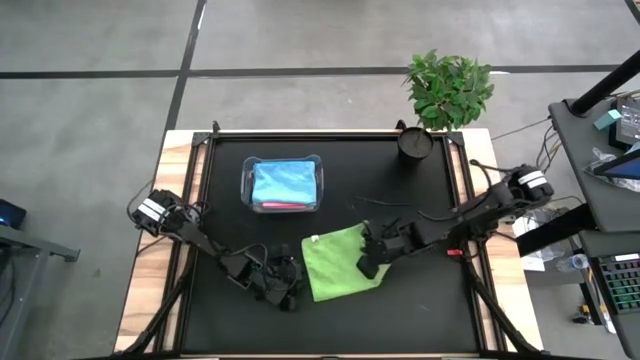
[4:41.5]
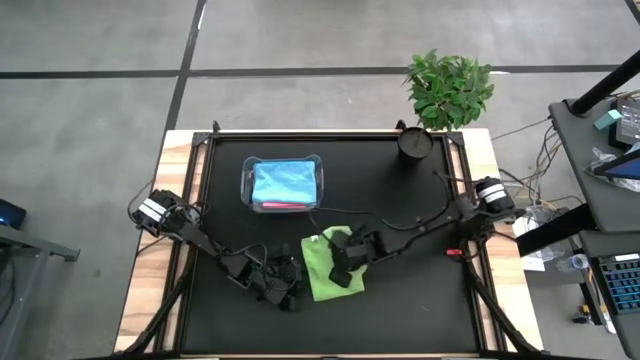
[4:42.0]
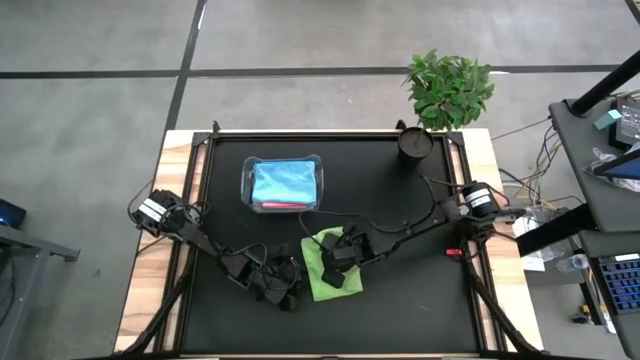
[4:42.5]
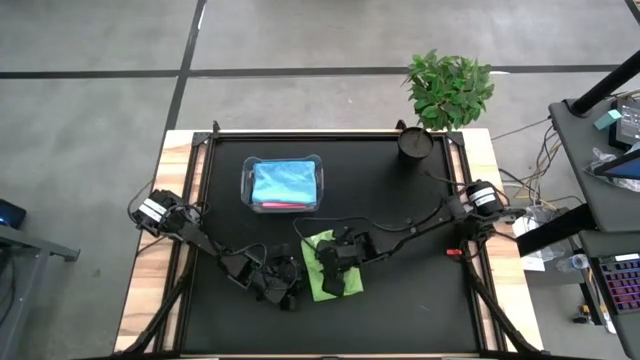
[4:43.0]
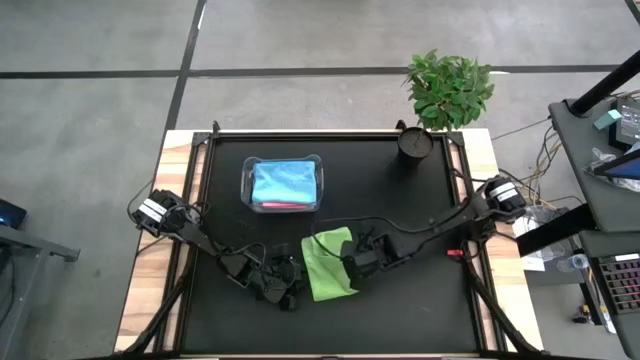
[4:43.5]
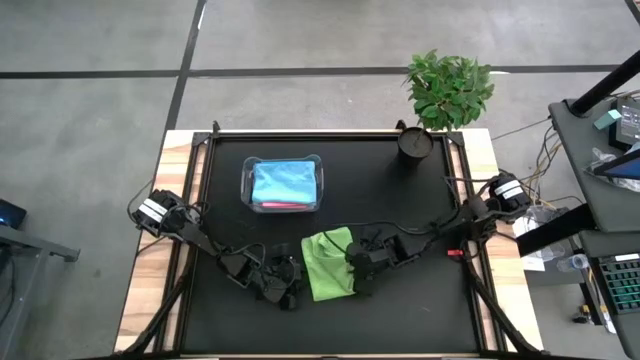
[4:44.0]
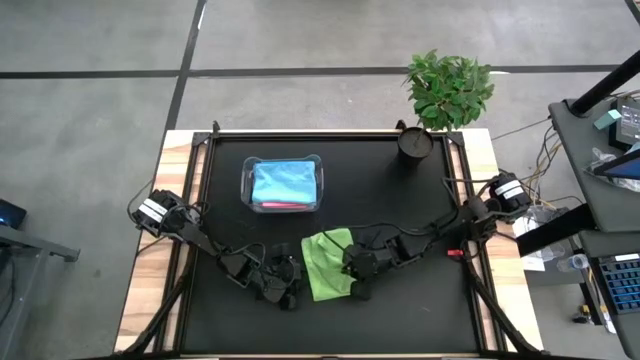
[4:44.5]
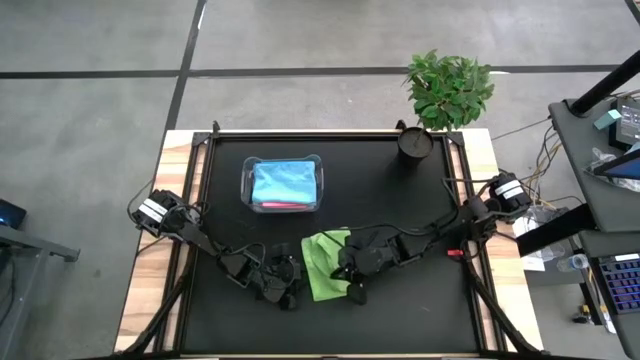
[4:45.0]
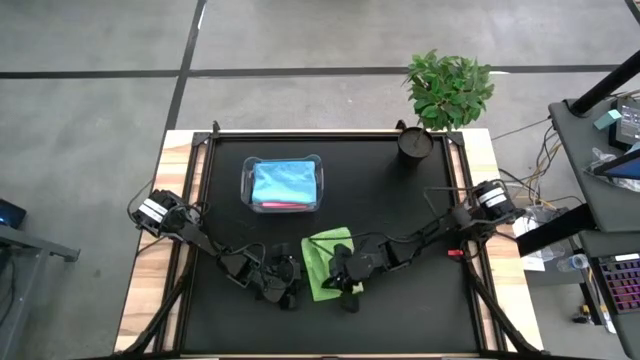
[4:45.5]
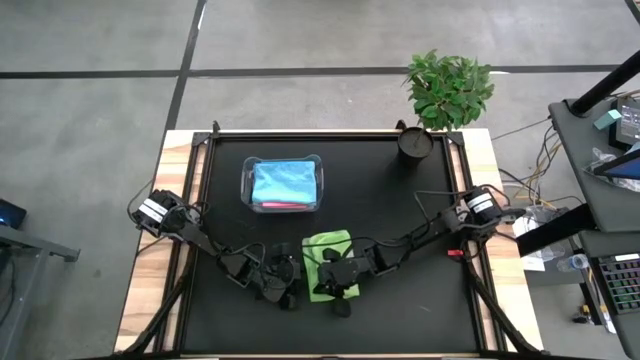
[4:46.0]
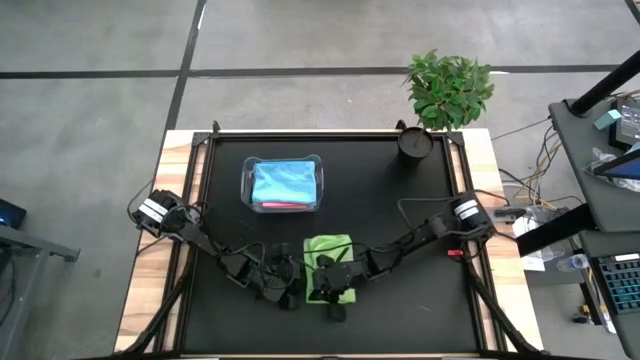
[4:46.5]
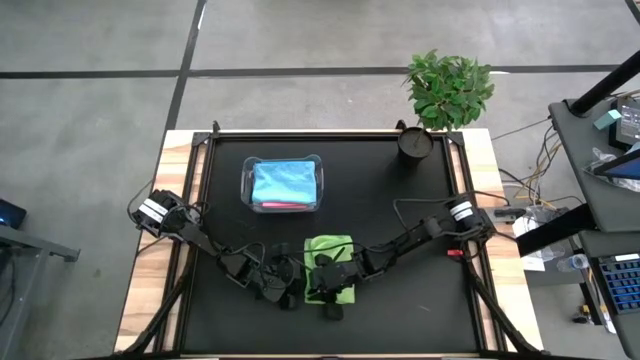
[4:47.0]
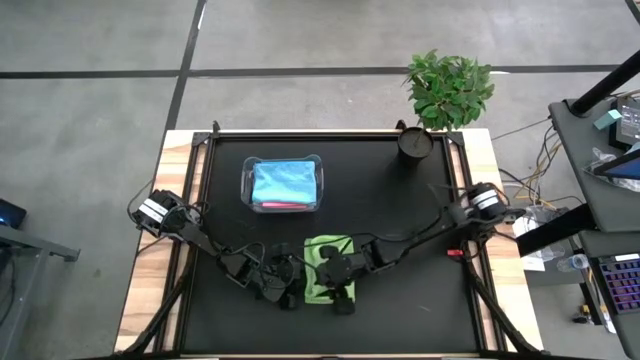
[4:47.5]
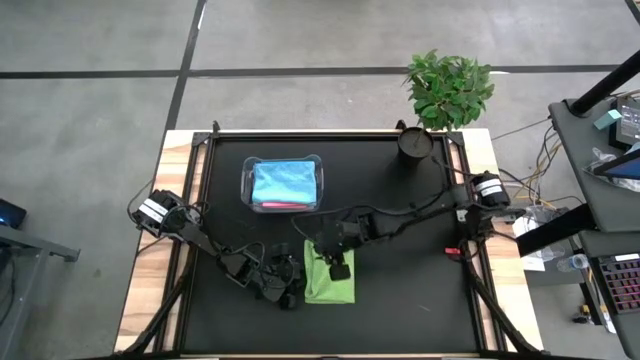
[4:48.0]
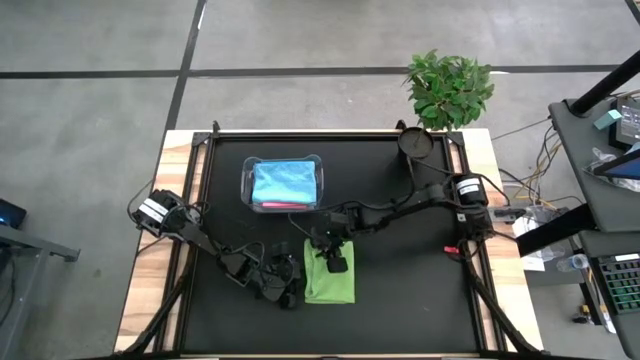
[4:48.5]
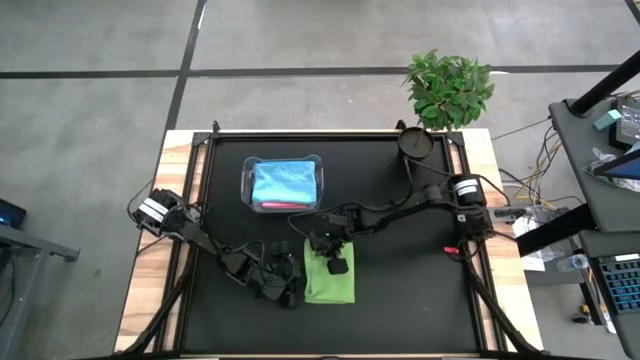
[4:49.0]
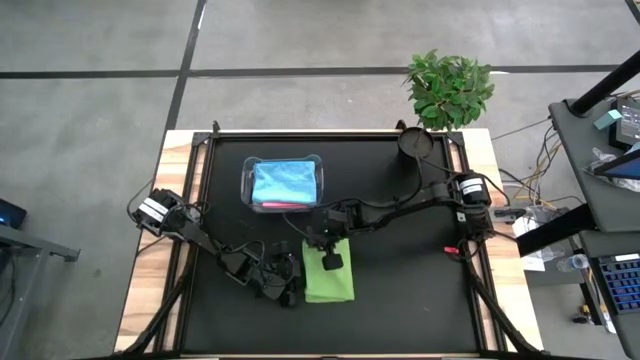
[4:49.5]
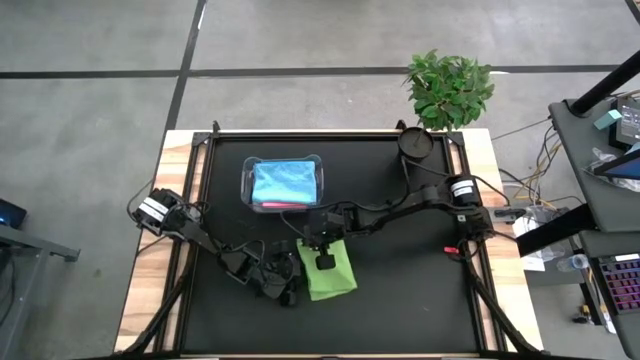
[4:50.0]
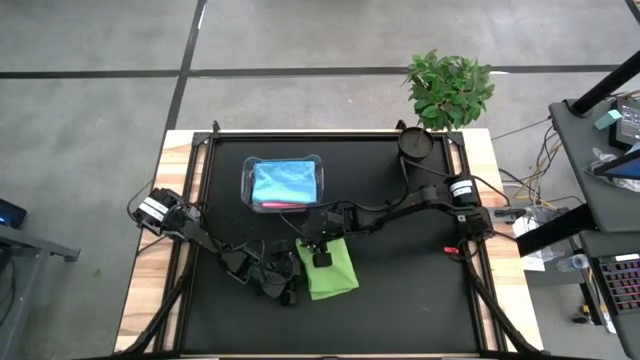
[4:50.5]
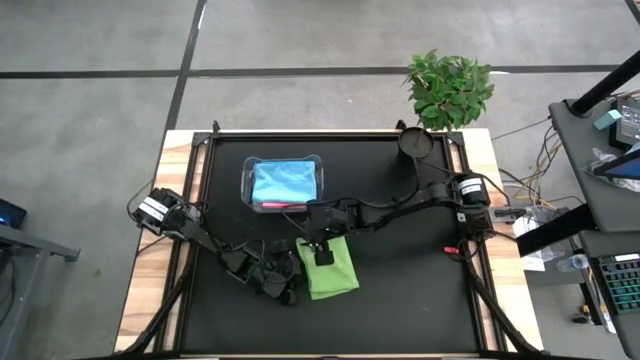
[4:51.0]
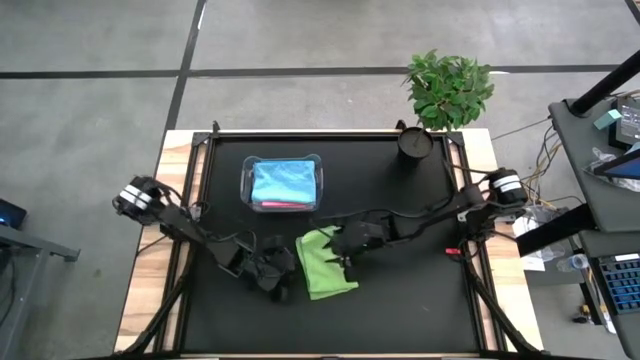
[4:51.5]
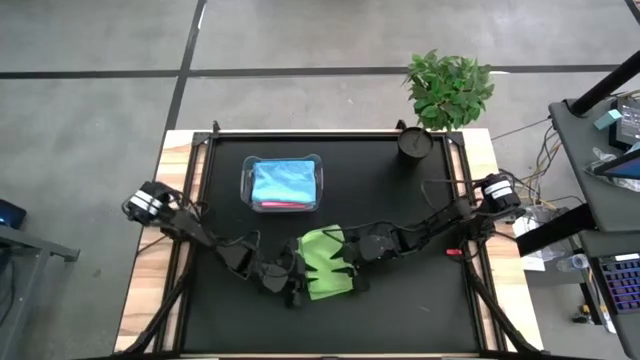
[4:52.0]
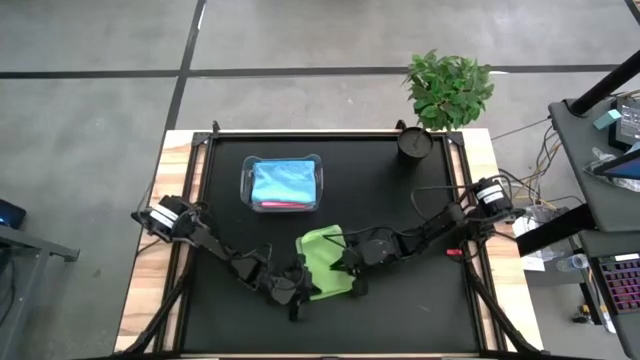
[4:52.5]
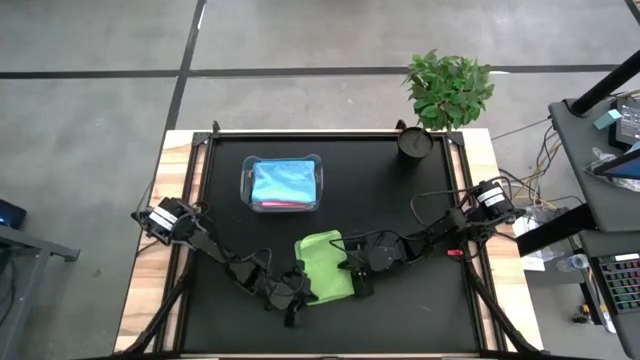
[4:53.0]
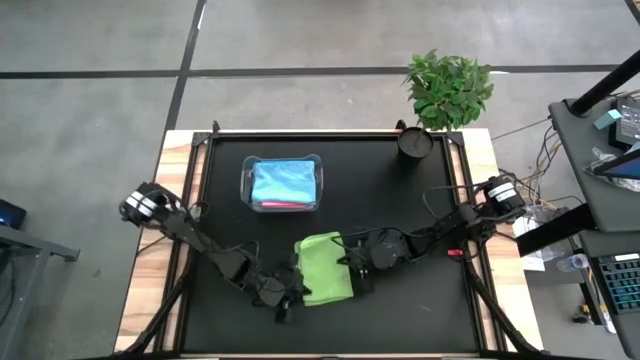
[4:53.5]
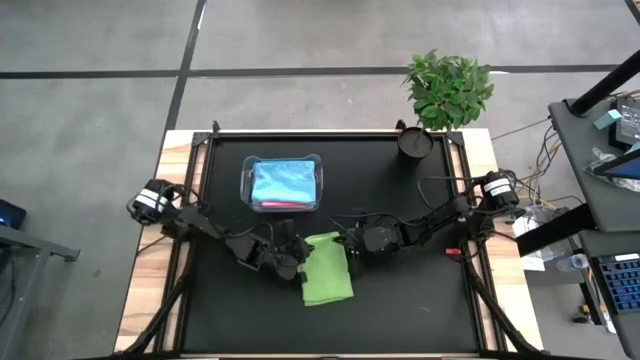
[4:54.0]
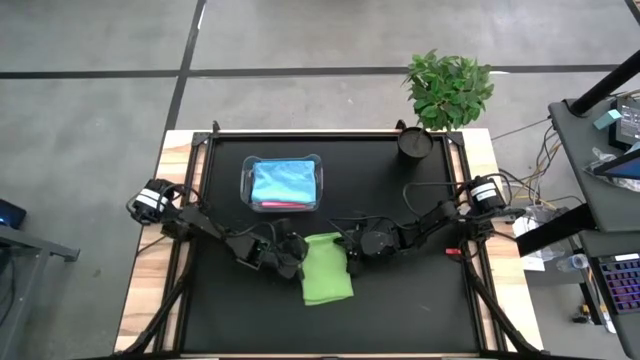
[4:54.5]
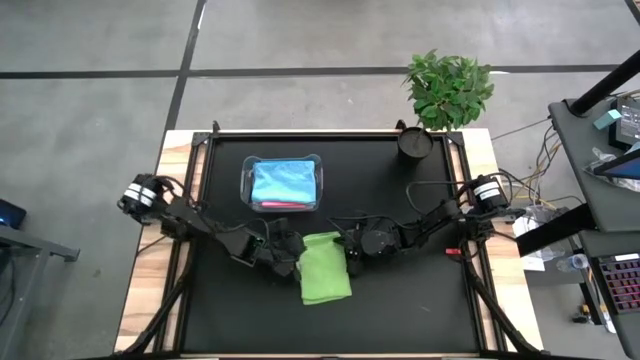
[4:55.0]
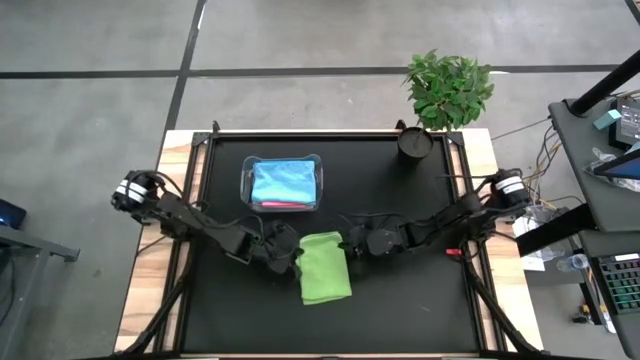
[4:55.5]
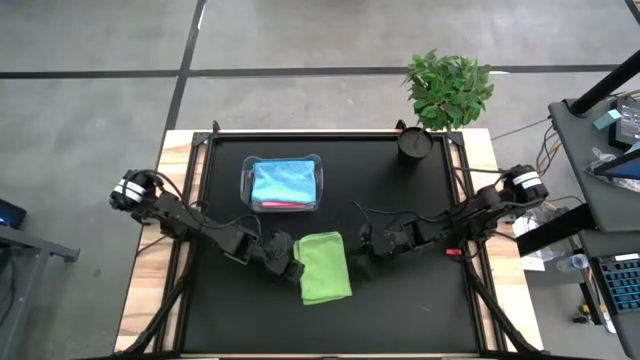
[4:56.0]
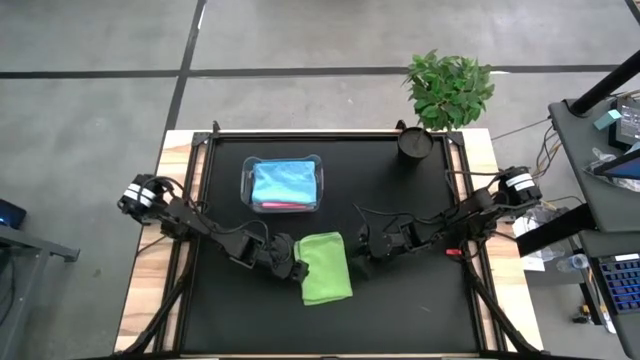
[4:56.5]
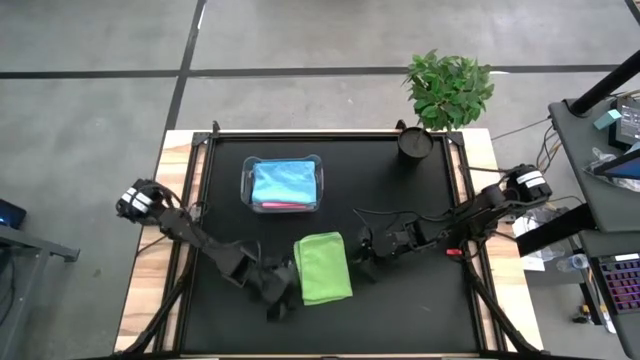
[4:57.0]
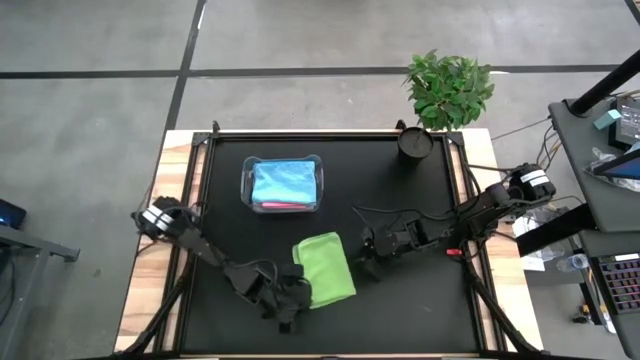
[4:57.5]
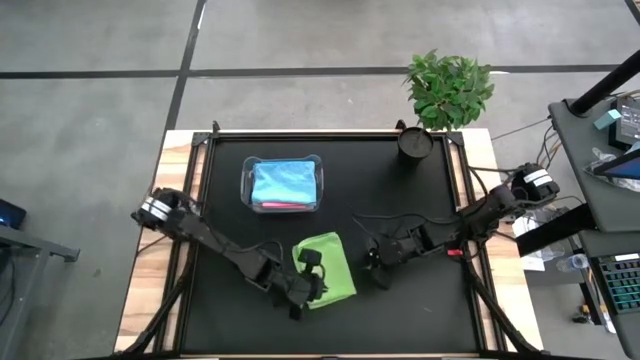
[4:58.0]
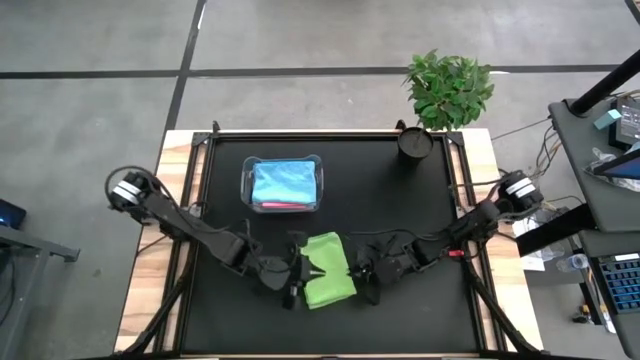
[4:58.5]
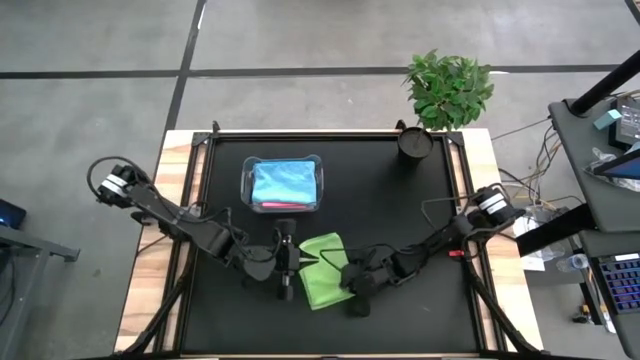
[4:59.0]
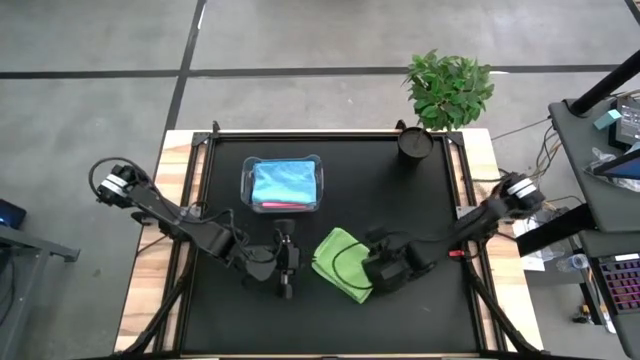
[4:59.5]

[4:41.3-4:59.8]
Task: Fold microfiber towels
Fold the green microfiber cloth

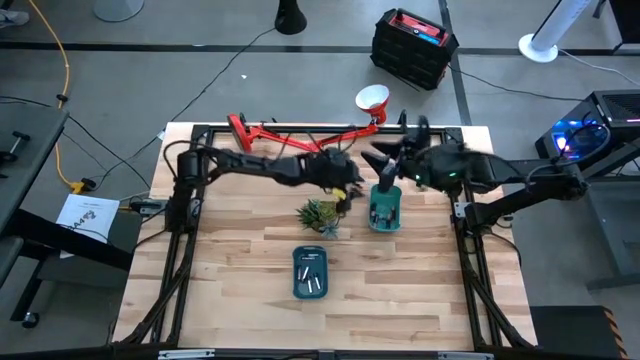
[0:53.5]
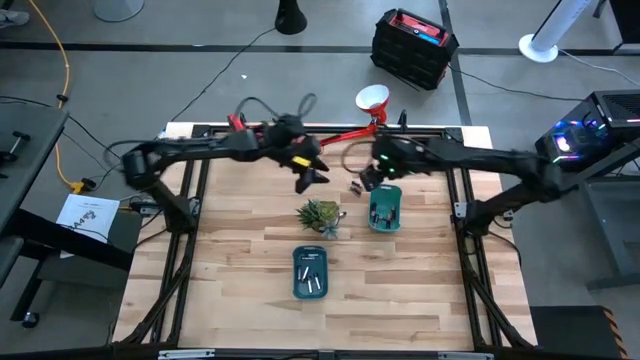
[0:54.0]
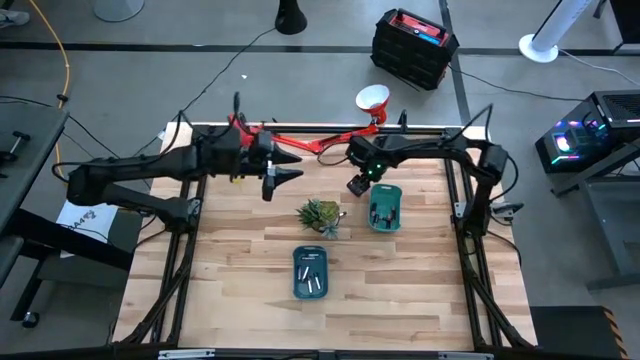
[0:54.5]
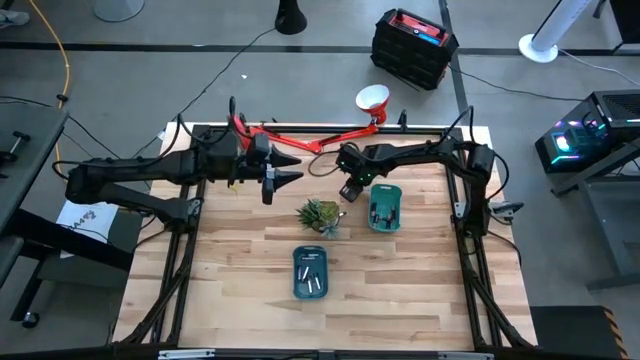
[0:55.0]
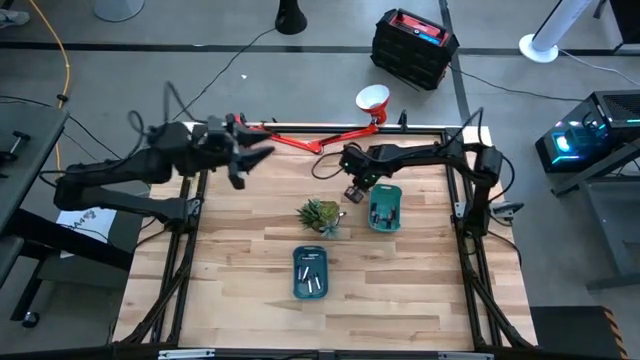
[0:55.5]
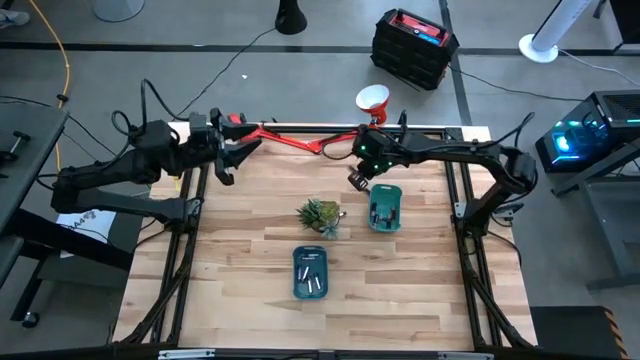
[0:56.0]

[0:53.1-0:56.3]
Task: Sort batteries
Put the black battery into the green bin

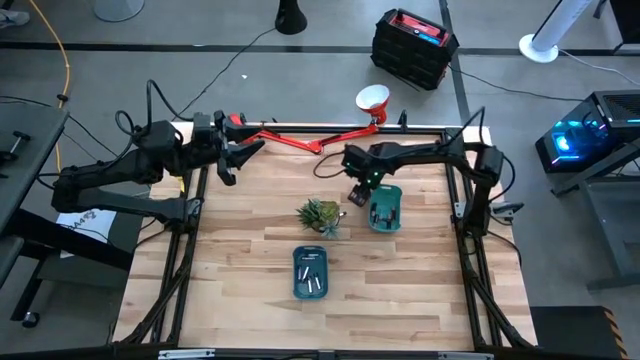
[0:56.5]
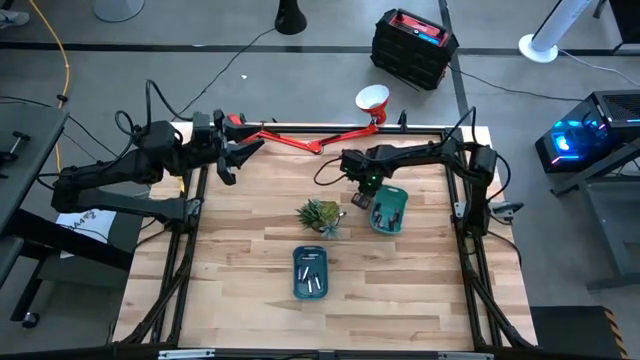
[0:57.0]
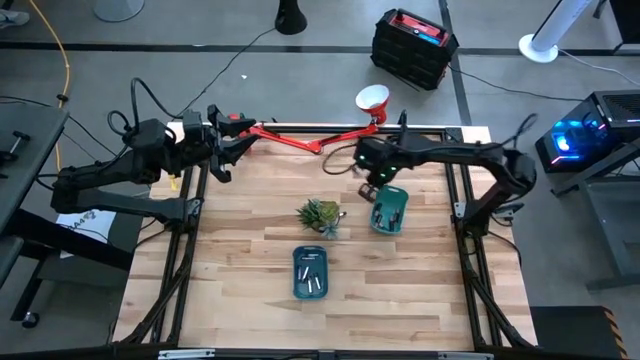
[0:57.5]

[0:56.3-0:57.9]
Put the black battery into the green bin
